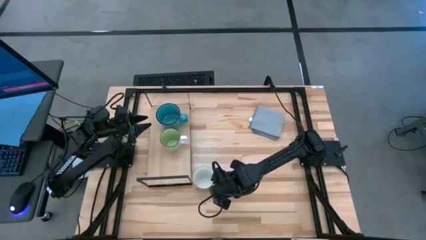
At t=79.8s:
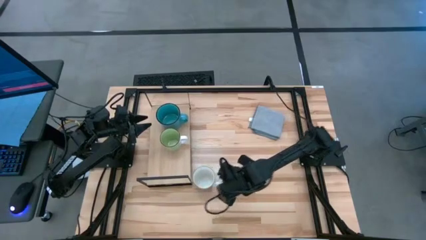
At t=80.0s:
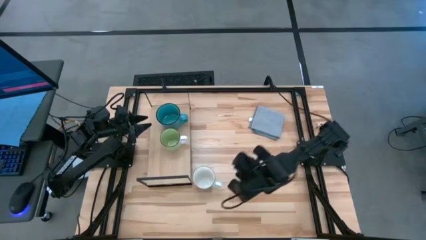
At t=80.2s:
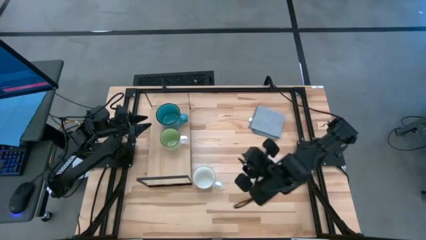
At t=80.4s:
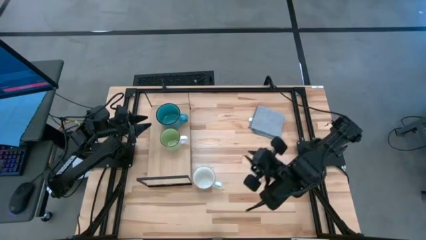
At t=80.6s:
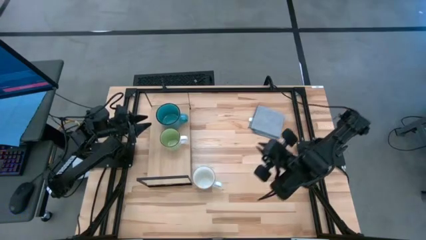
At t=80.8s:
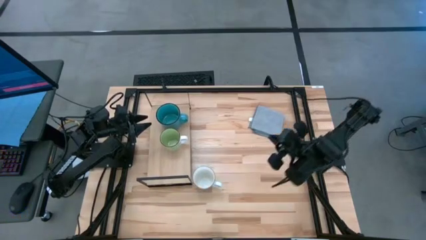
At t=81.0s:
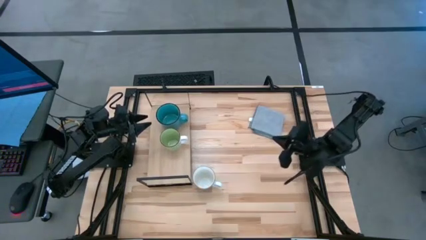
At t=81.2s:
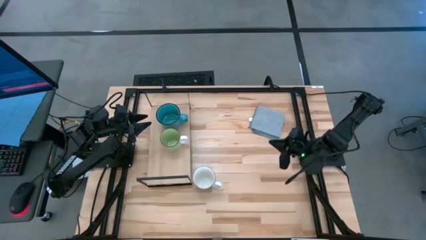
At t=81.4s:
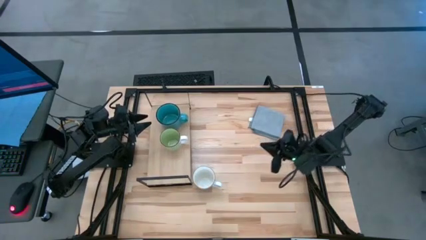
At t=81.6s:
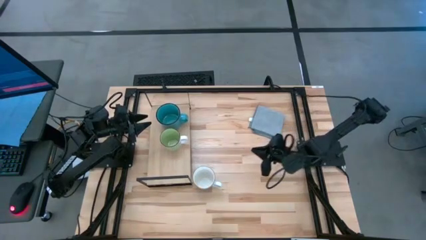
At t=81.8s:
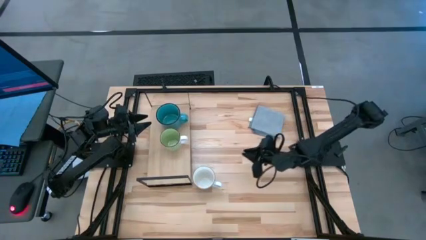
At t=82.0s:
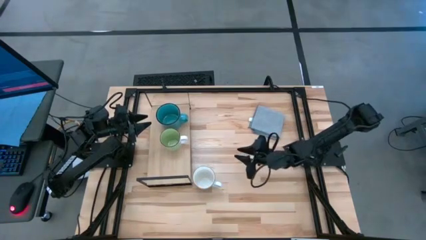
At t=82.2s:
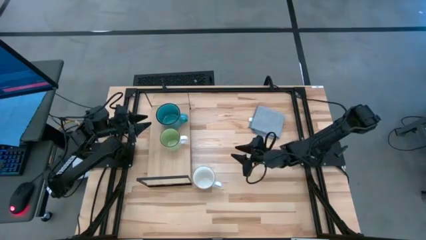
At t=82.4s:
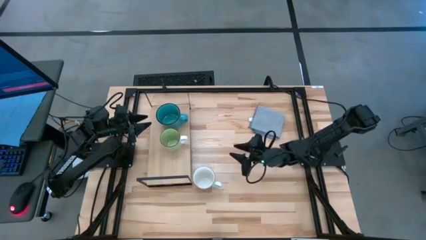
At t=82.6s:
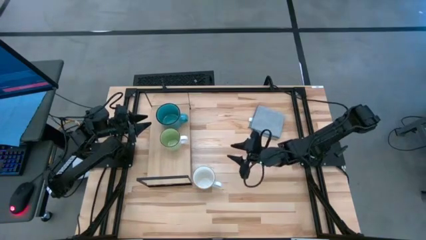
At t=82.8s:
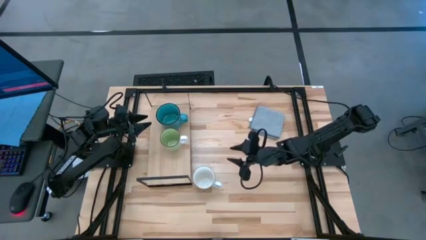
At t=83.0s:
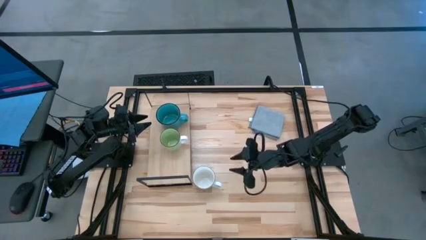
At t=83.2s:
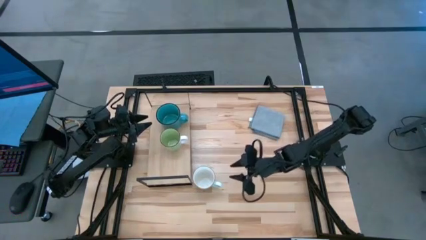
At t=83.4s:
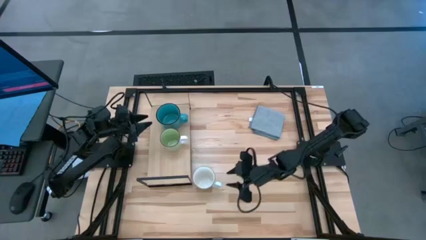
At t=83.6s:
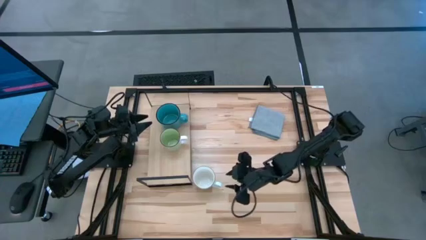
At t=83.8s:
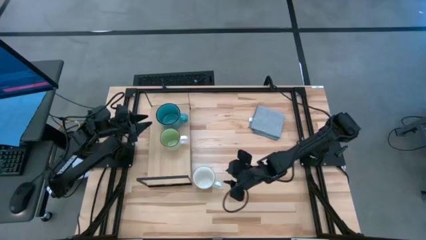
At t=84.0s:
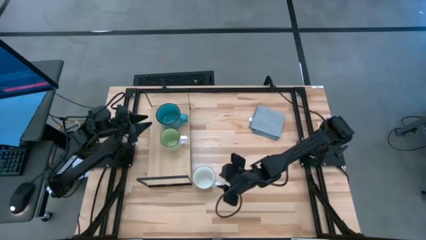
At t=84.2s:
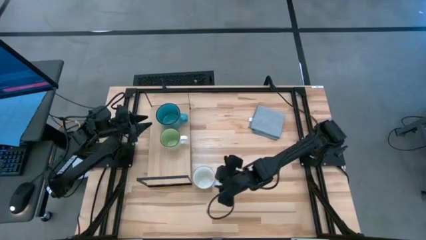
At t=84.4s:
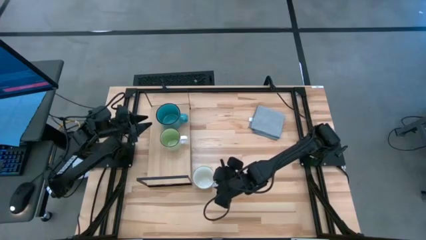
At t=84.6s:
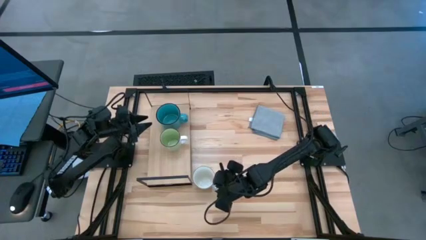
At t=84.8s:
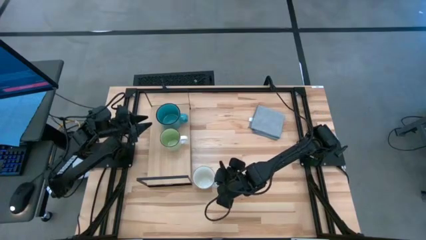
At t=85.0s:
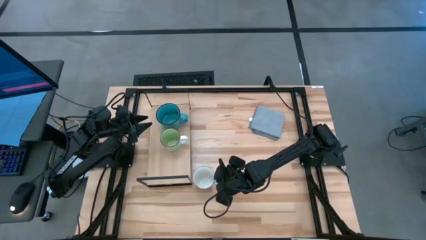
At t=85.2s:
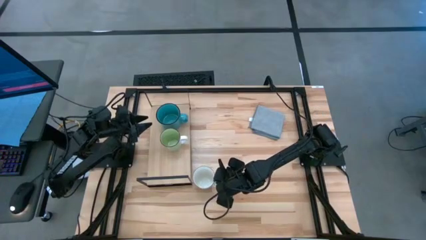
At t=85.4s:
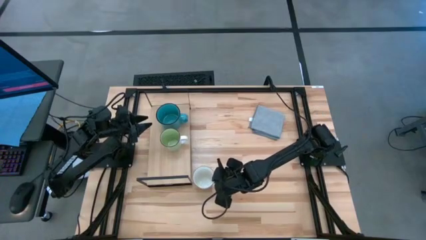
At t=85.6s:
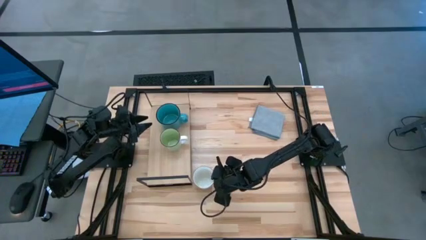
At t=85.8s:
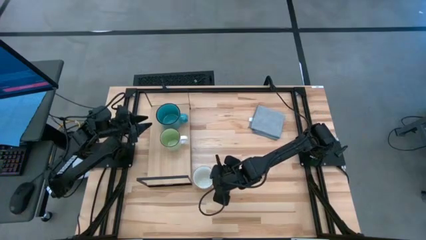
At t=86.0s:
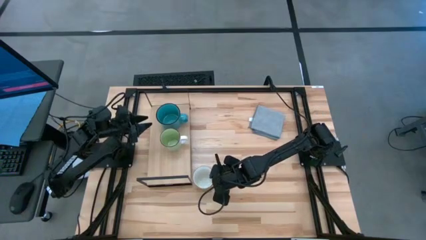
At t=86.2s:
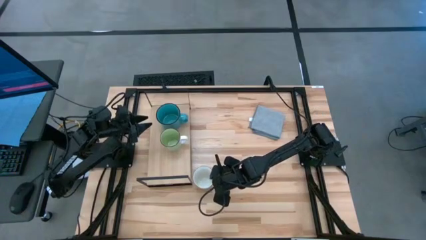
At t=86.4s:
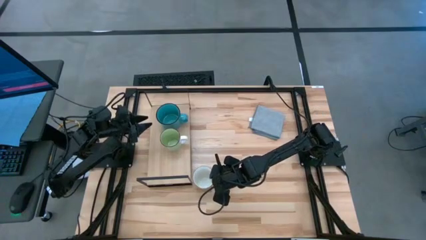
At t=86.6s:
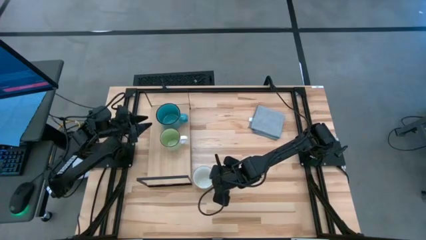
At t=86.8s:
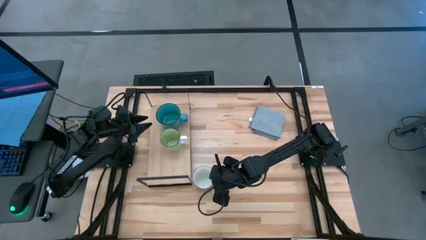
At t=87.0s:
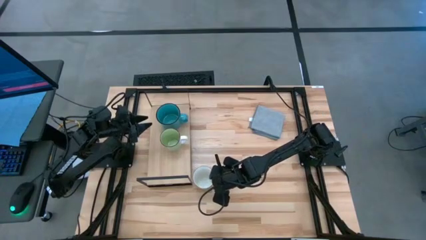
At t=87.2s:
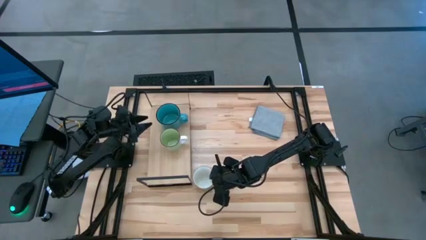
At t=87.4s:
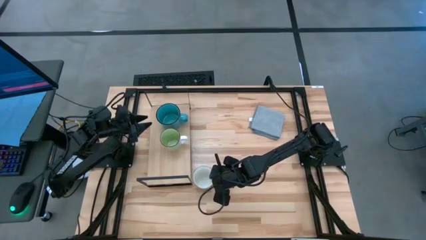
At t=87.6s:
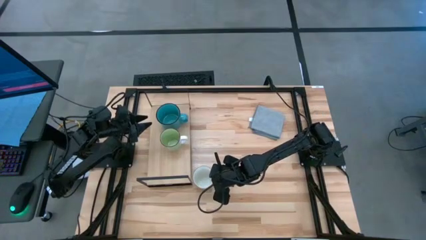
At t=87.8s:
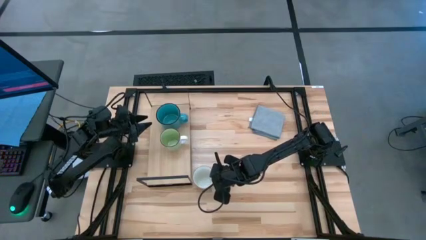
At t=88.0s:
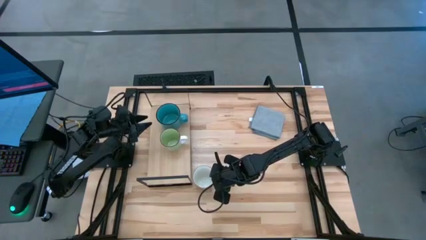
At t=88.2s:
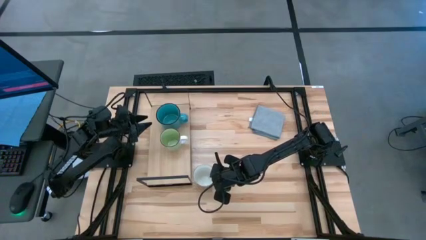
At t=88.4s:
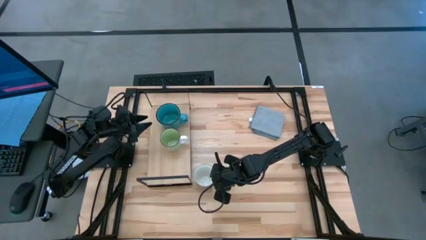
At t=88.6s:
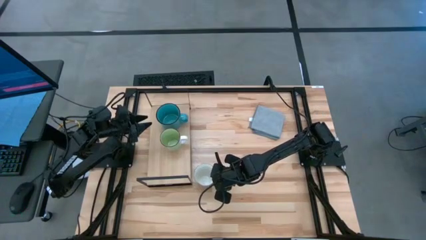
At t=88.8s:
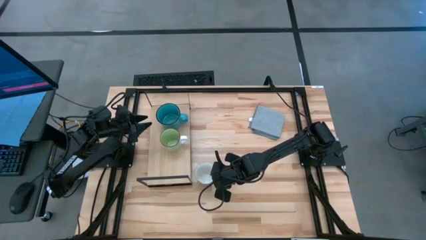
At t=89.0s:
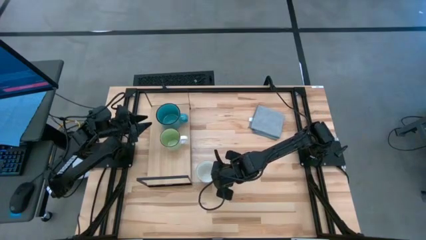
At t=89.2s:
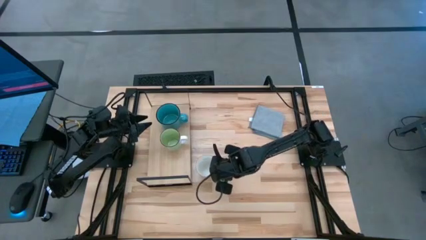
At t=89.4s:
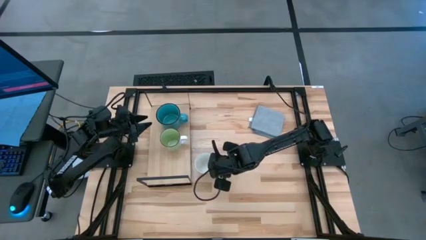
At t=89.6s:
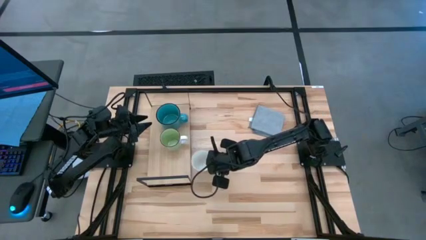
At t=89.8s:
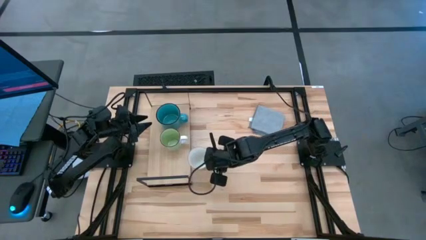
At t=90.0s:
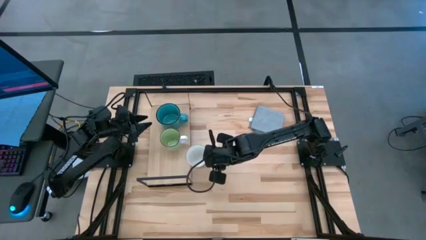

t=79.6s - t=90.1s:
Task: Stack small to large cups/mugs on shelf
Put the white mug on the shelf

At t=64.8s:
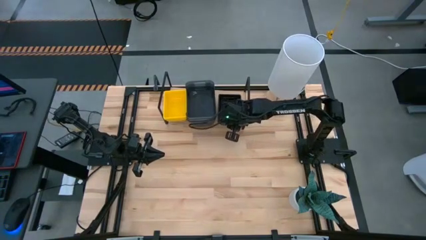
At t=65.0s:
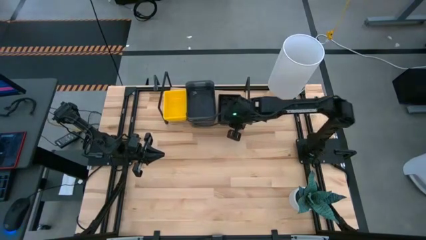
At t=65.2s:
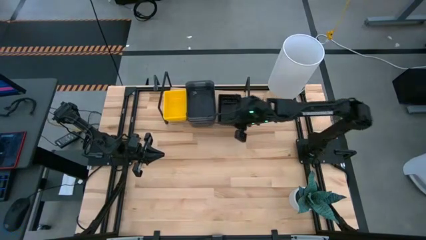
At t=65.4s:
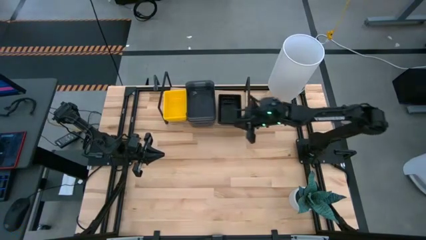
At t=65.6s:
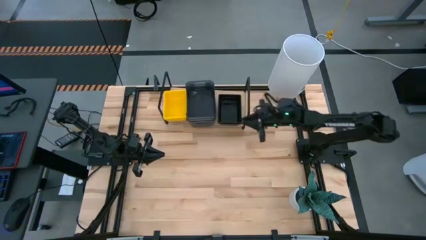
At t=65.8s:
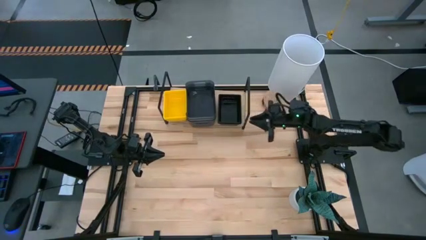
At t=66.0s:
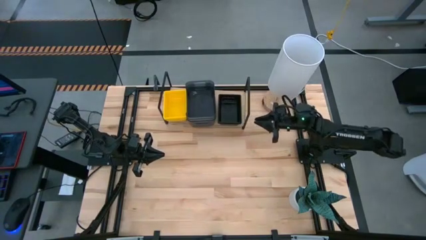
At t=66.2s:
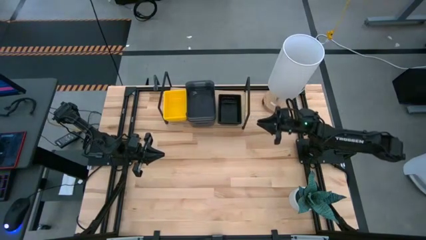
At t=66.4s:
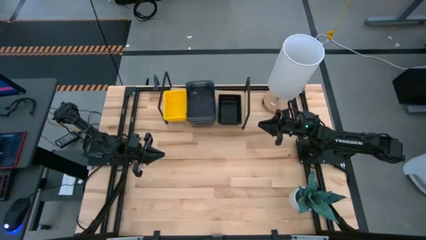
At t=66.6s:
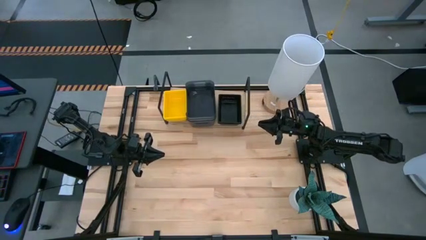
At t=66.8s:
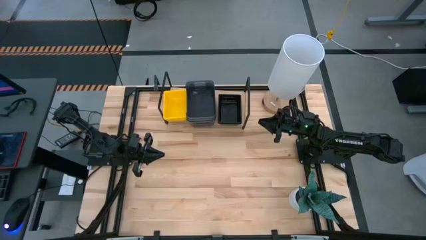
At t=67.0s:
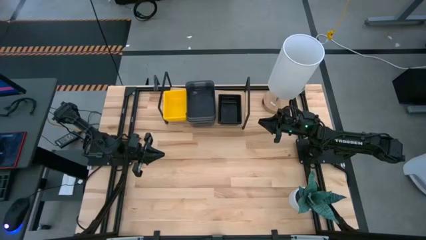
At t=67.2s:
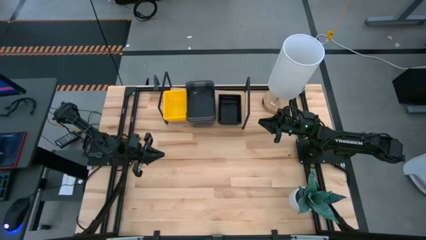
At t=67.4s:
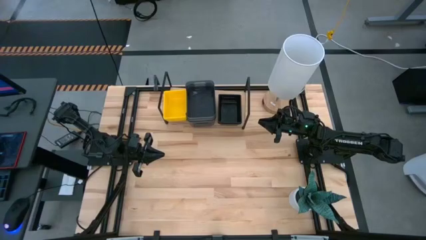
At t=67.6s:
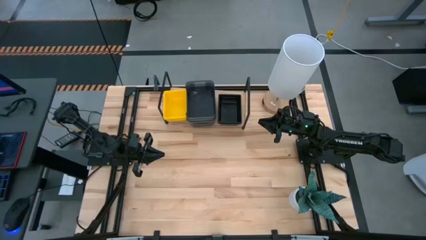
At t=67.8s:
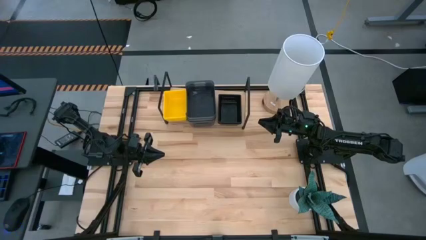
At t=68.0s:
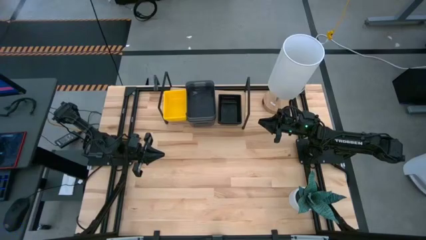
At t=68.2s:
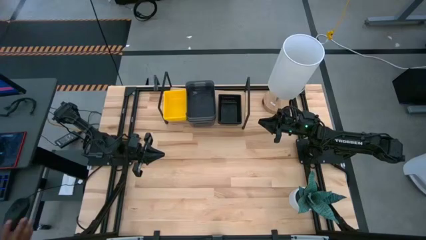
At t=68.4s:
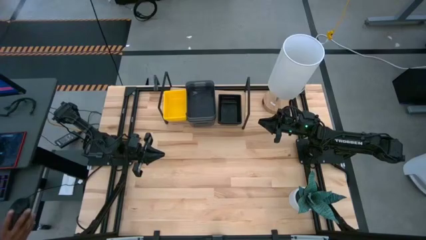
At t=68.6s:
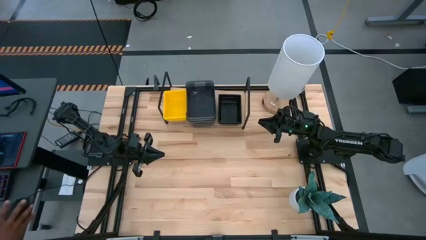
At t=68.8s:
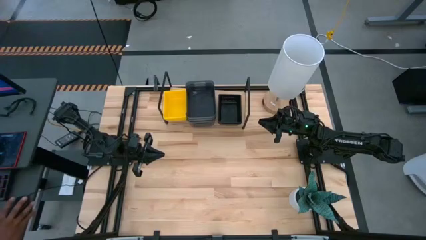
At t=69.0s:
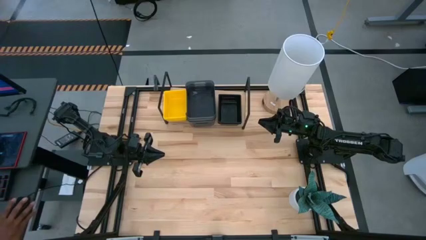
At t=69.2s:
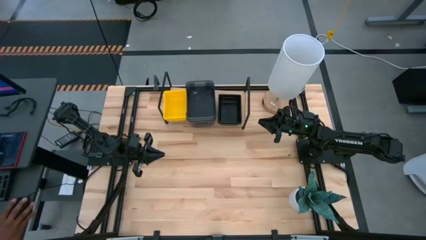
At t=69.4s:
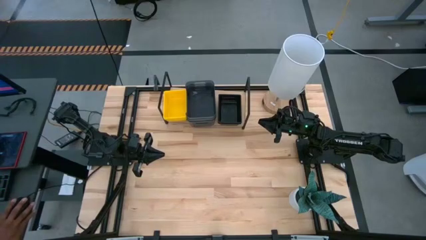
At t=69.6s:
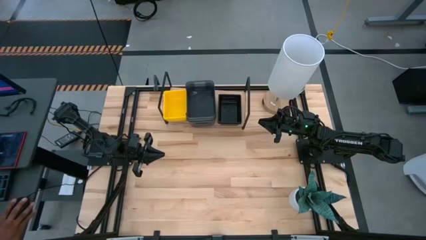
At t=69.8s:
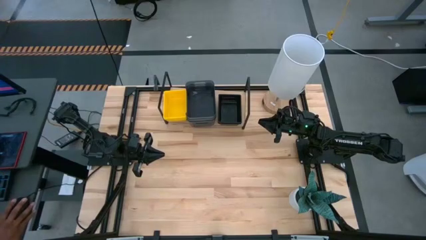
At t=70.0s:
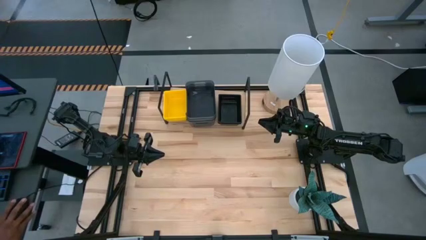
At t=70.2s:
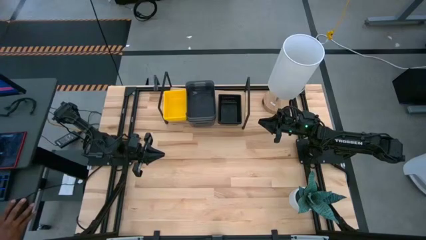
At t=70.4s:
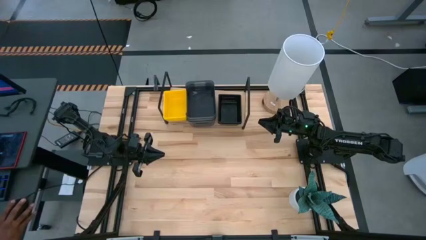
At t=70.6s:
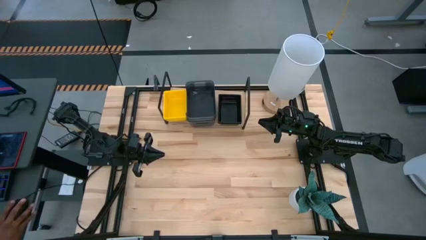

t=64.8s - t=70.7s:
Task: Stack baskets on shelf by color
Return to Home Position

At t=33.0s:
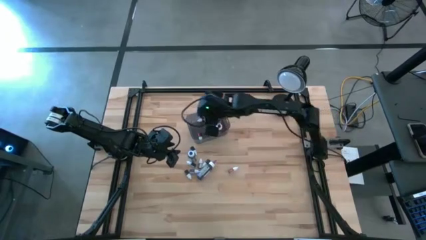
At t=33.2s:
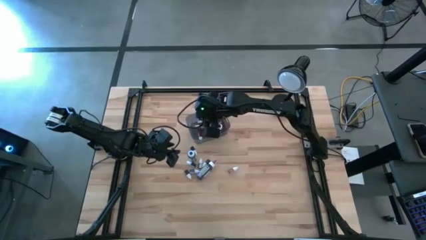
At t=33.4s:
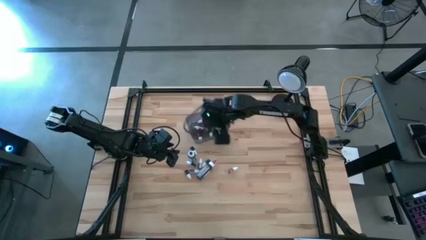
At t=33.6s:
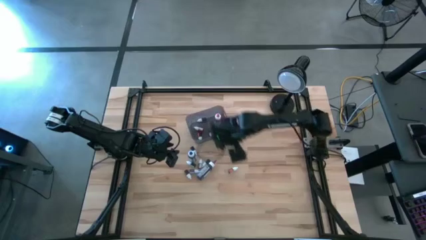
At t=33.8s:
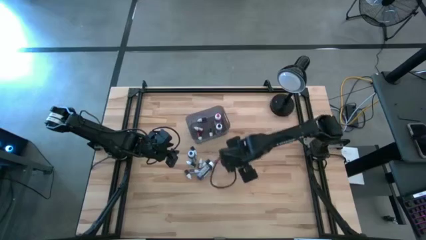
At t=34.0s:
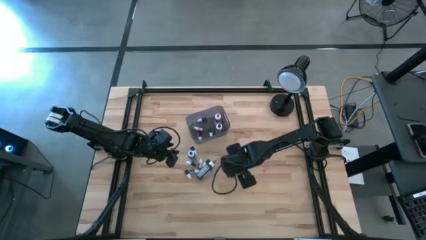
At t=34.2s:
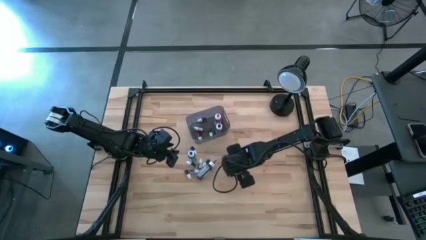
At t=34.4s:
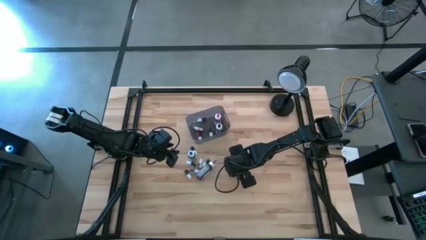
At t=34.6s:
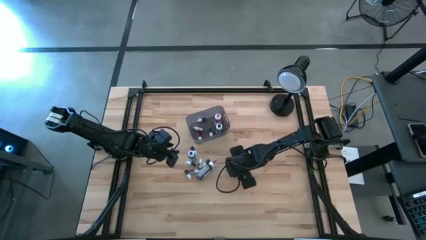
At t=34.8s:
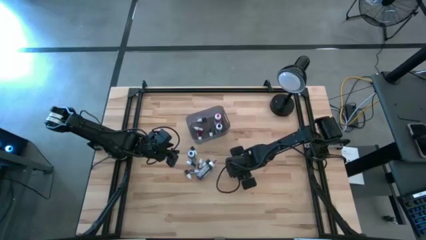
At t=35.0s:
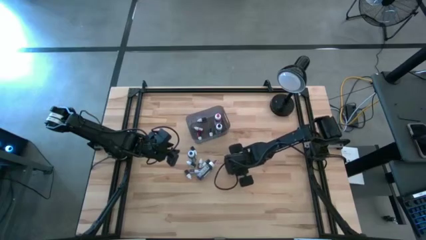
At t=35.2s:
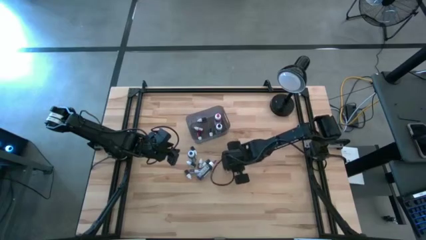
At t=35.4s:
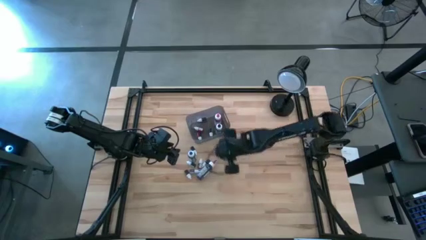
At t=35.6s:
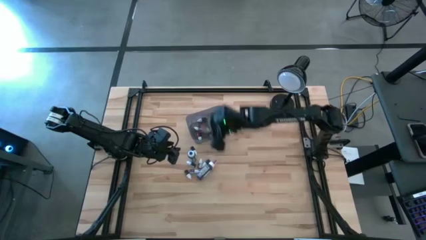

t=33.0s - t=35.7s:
Task: Pick & Place food coloring
Put the small orange food coloring bottle into the gray bin
